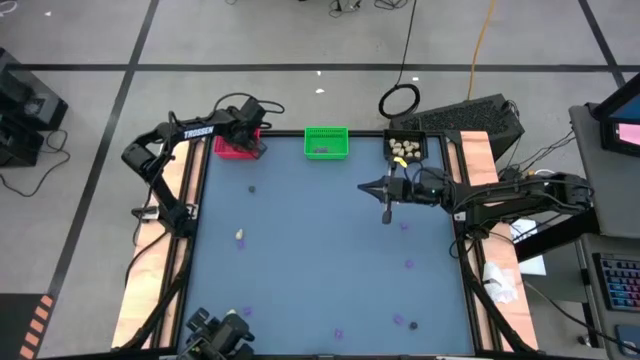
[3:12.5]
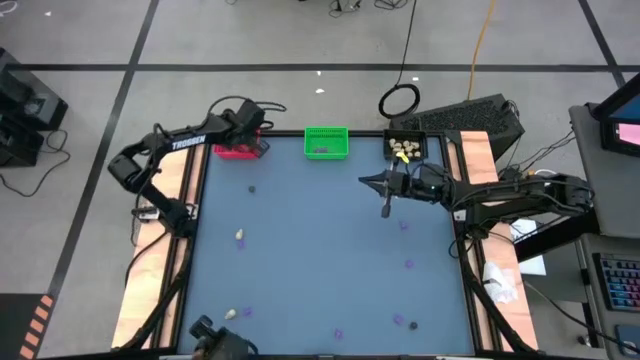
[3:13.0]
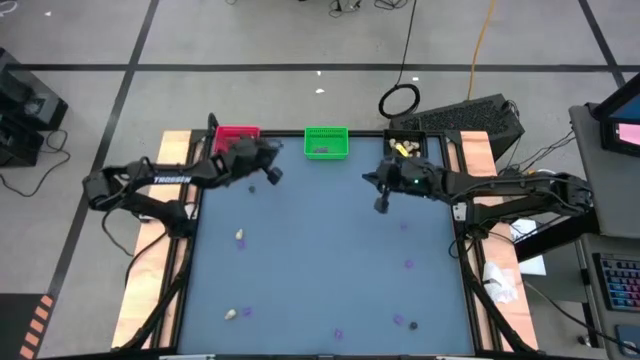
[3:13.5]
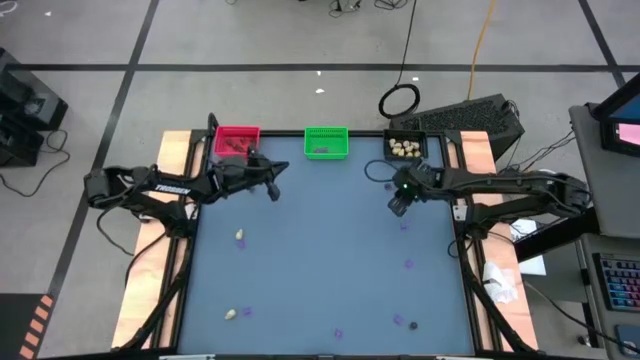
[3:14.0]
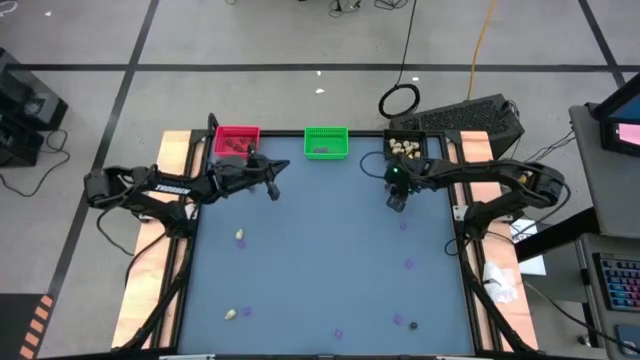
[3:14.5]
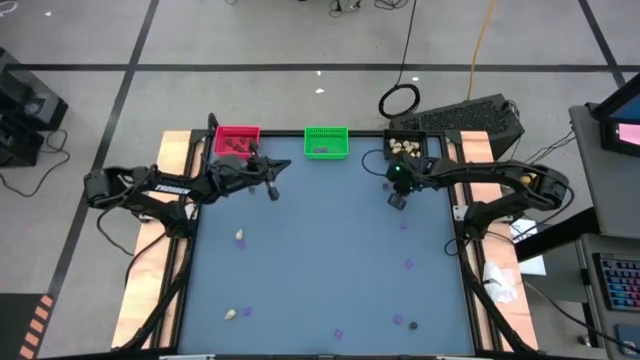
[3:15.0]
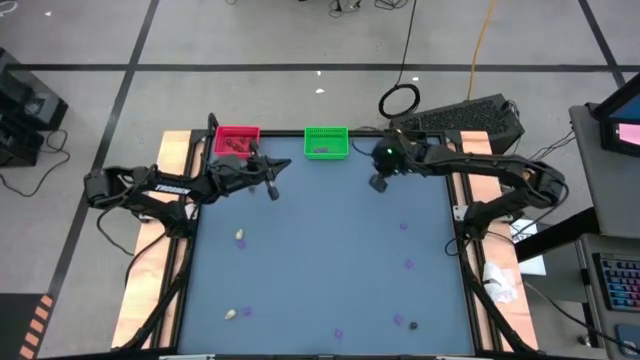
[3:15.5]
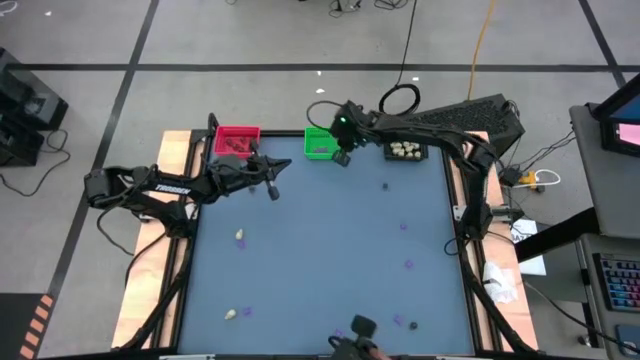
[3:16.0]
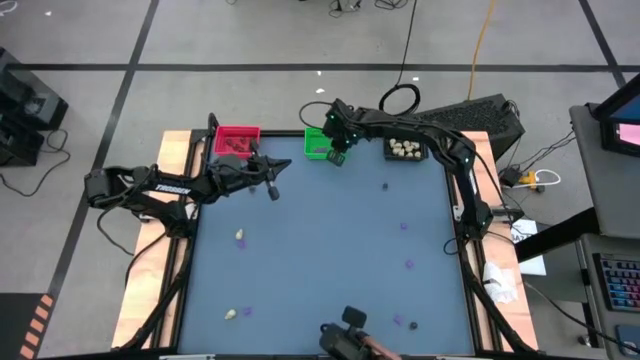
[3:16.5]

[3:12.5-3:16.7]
Task: Sort Halloween decoration
Put the purple spider toy into the green bin

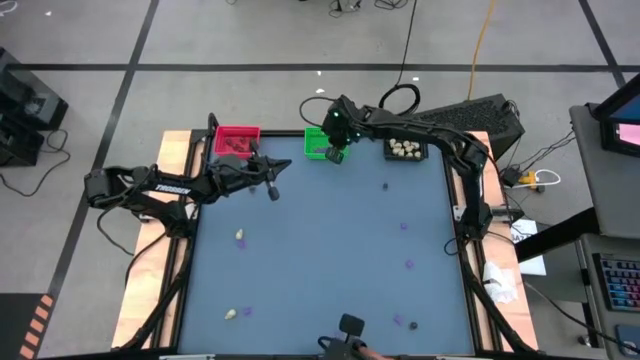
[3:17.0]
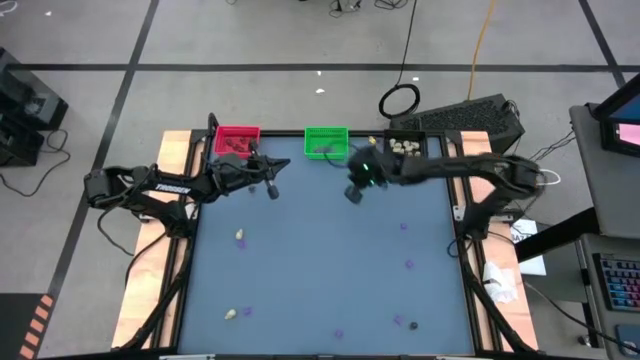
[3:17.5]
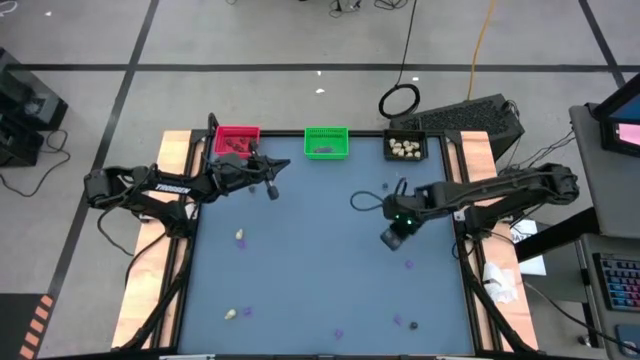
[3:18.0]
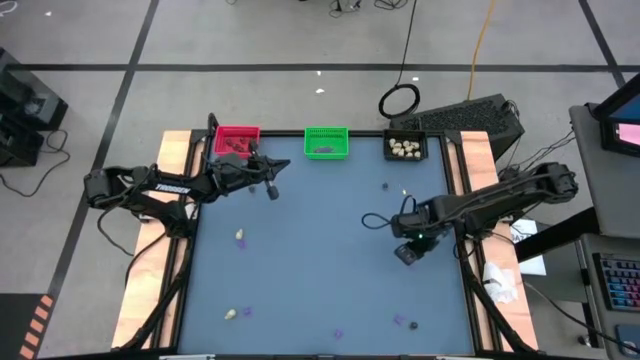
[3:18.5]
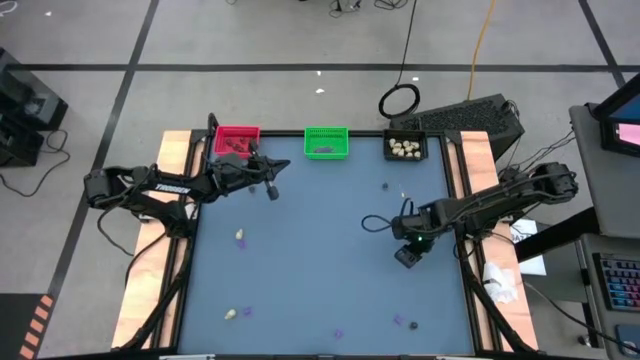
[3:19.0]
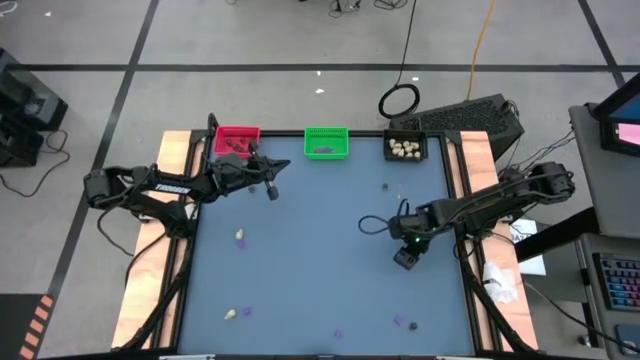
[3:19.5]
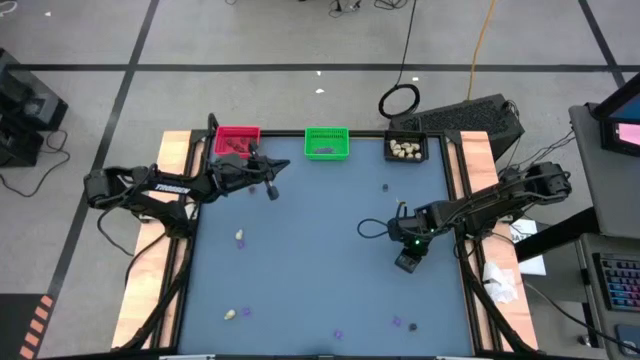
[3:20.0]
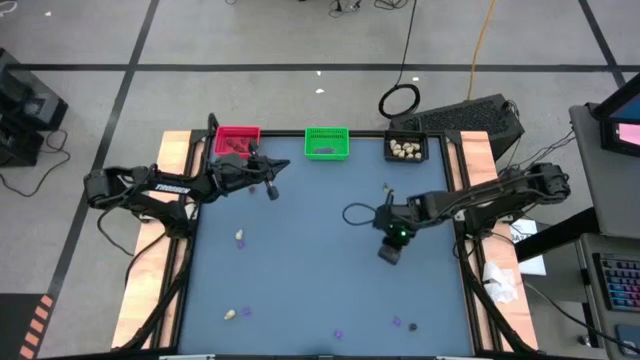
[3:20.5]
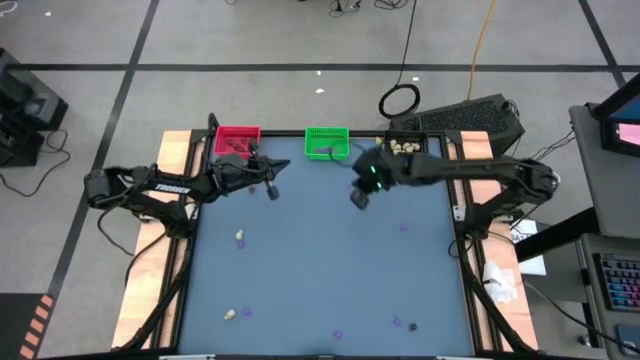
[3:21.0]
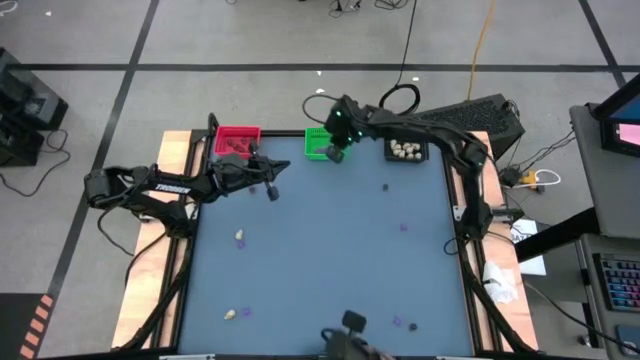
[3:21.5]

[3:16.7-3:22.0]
Put the purple spider toy into the green bin

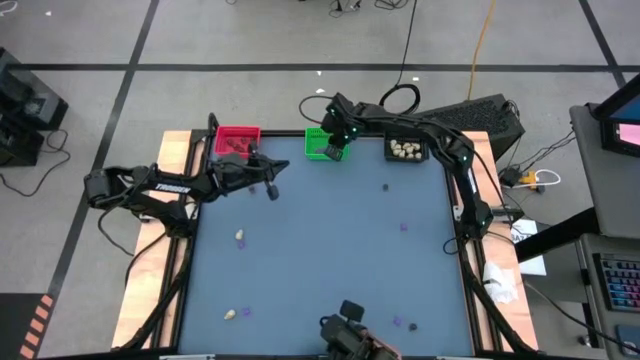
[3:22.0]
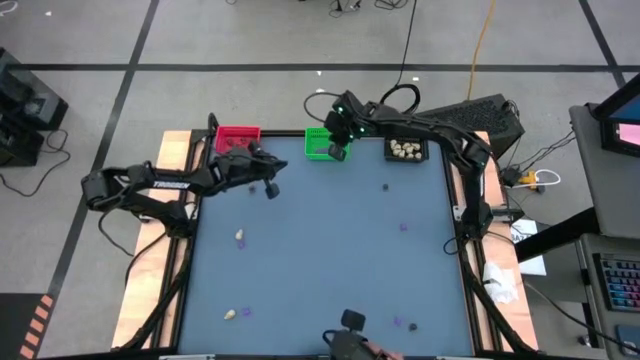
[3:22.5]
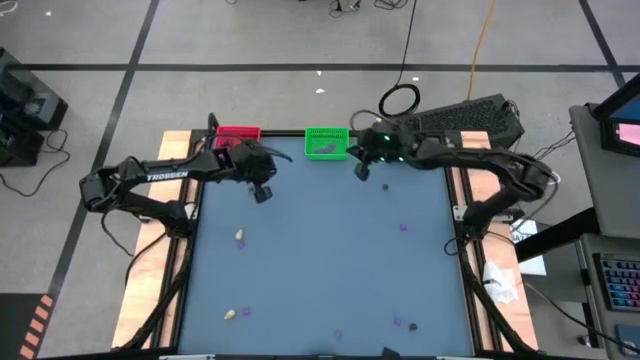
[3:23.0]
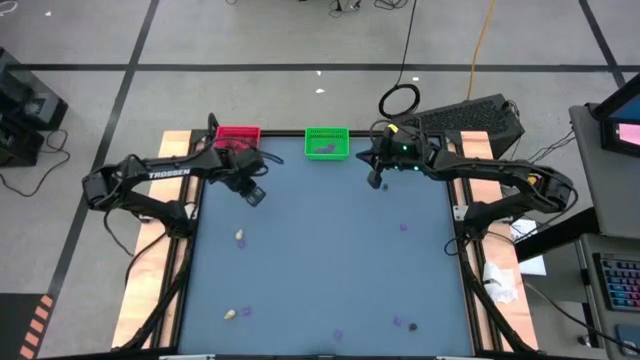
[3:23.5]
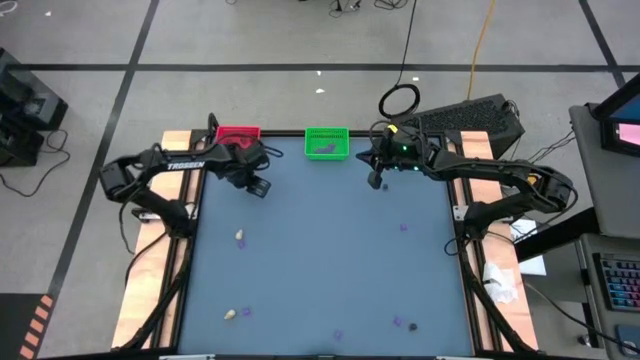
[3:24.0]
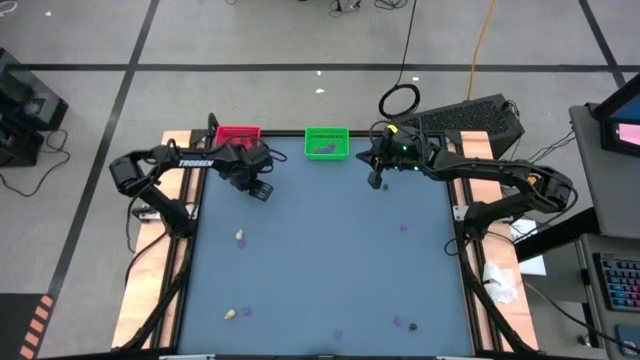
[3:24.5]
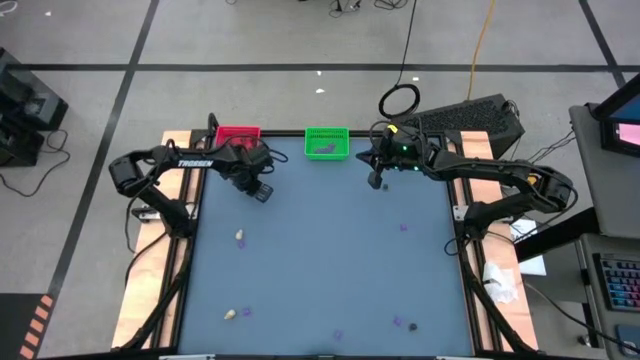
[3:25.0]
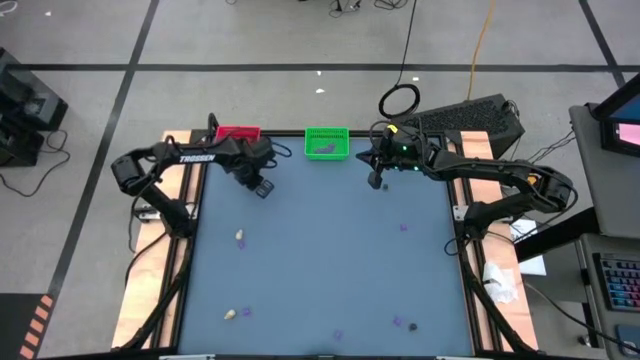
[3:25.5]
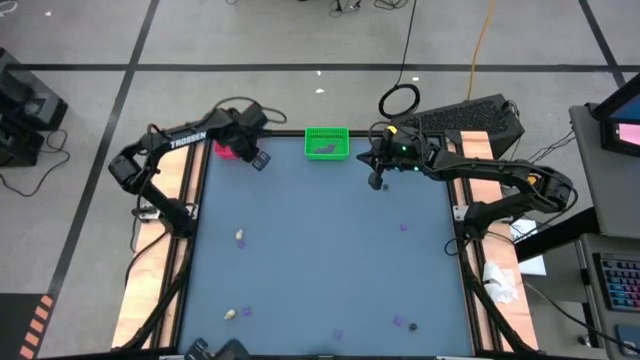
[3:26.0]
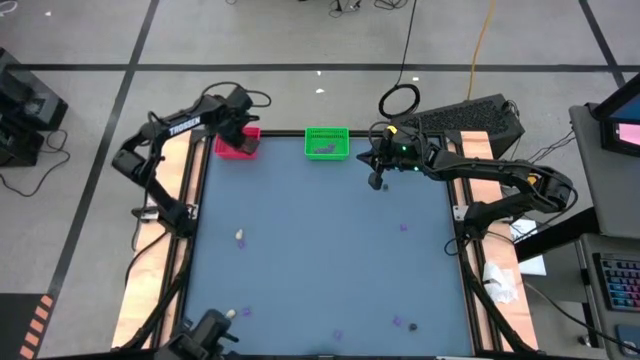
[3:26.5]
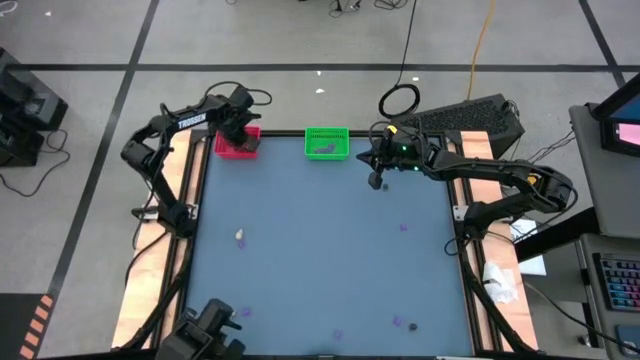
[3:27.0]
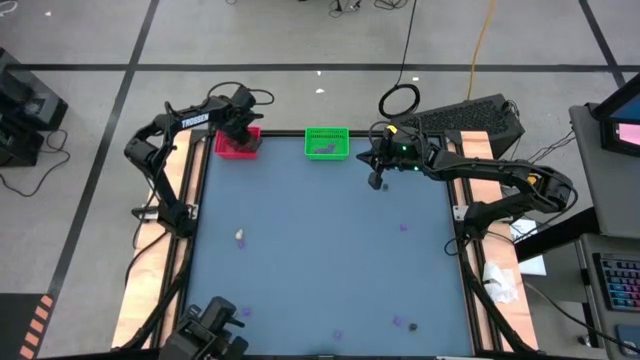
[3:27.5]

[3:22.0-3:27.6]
Put the black skull toy into the red bin

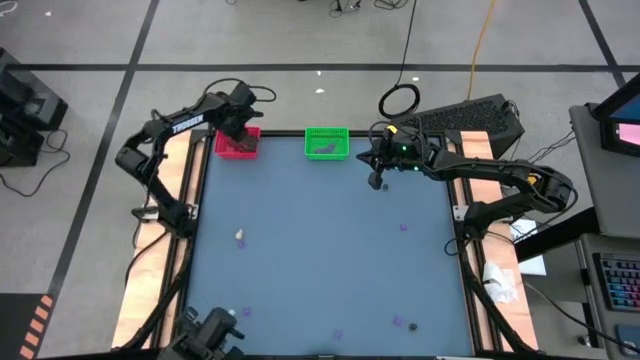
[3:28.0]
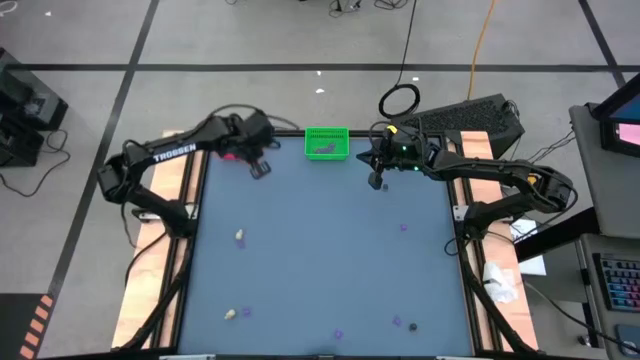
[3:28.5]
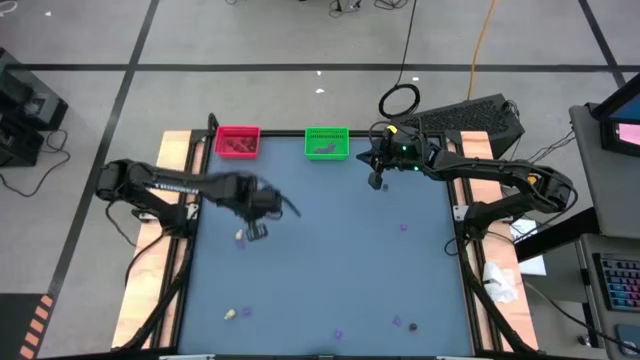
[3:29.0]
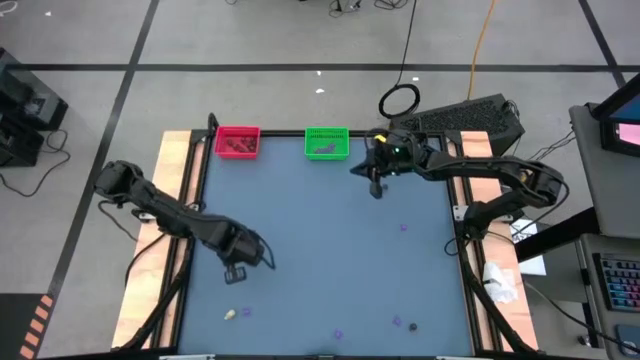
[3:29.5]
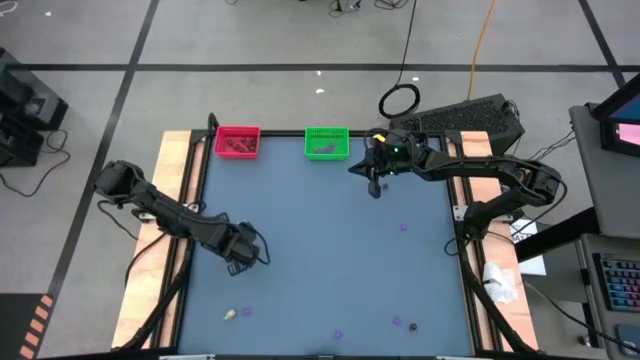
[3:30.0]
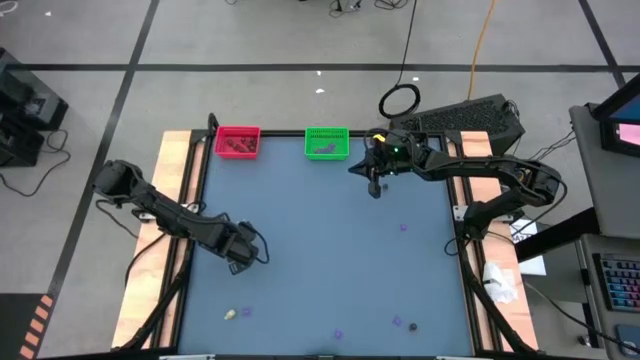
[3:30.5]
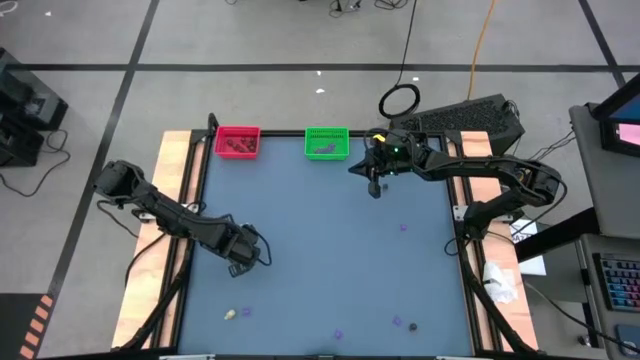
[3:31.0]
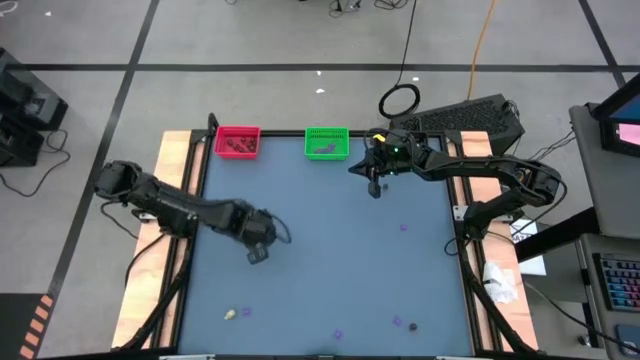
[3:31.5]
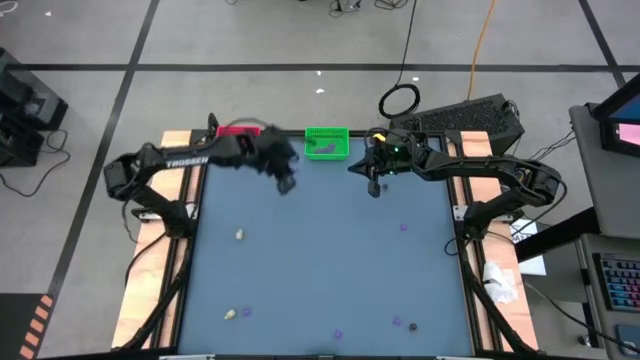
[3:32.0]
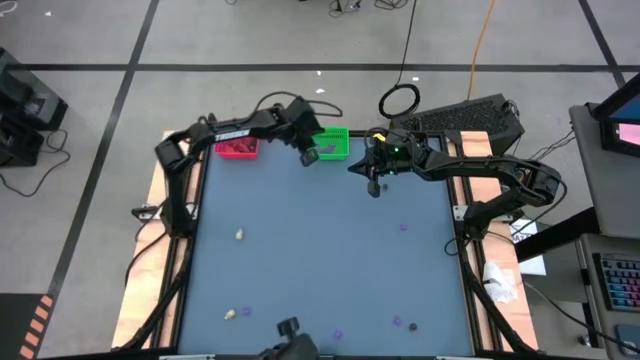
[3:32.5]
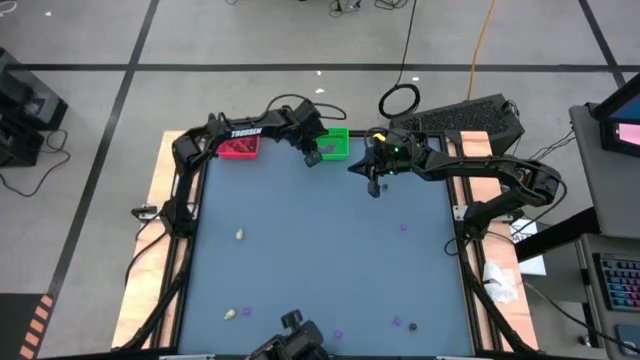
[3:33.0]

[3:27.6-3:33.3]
Put the purple spider toy into the green bin
